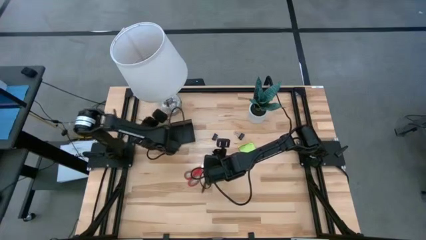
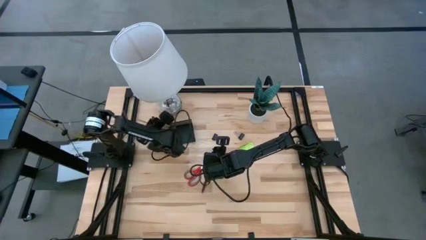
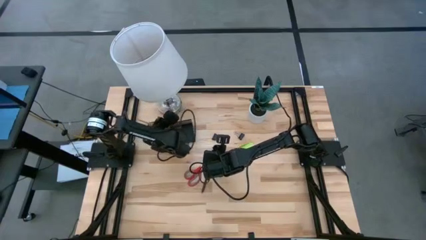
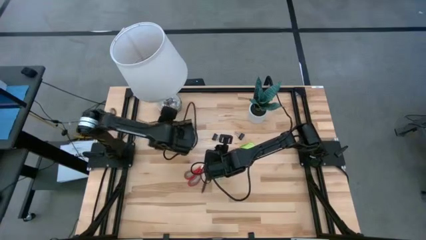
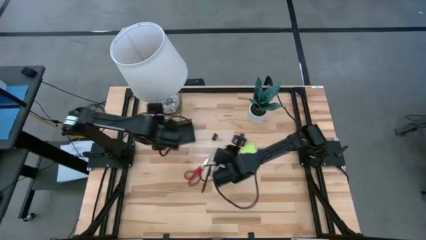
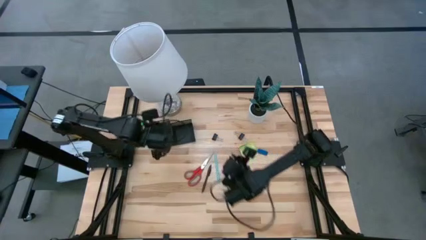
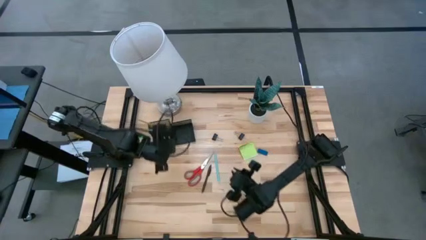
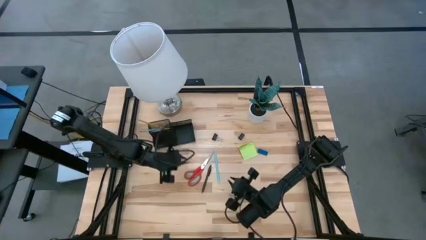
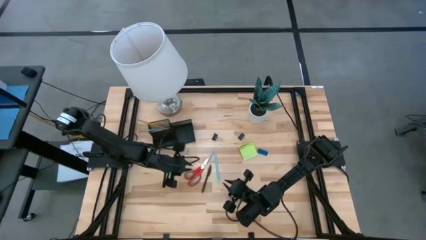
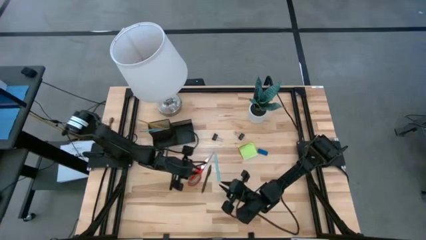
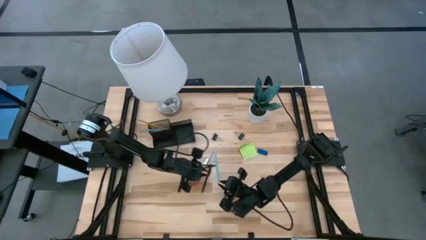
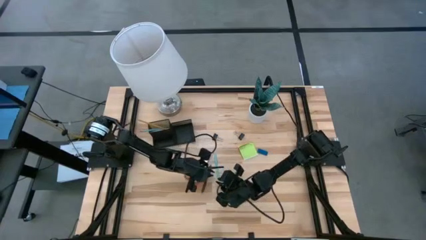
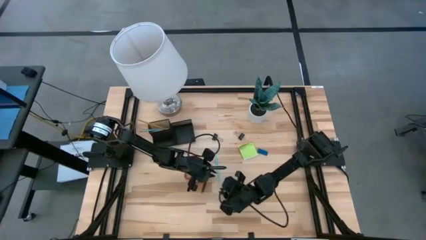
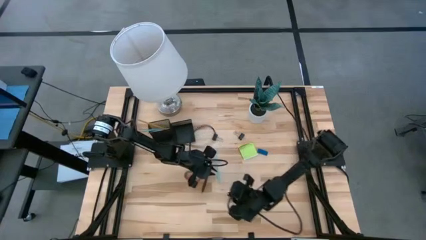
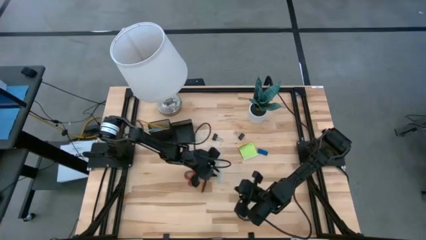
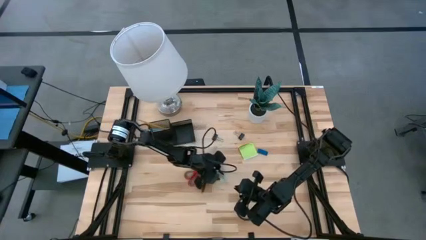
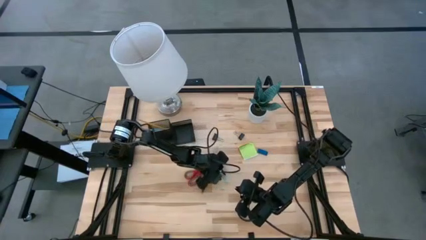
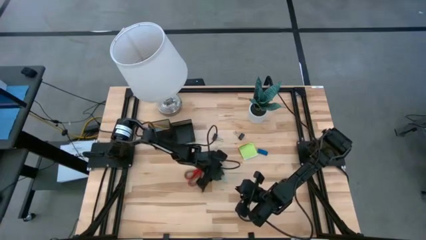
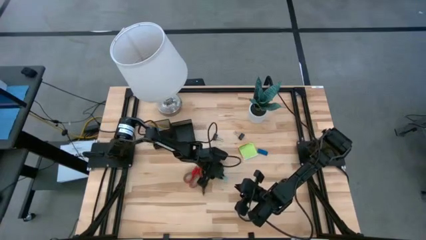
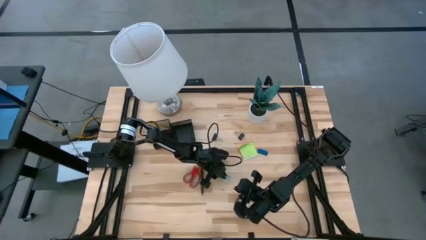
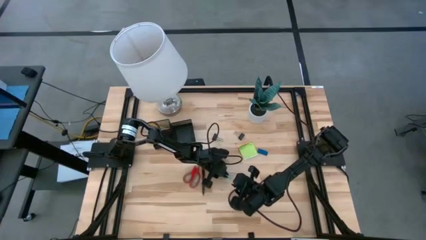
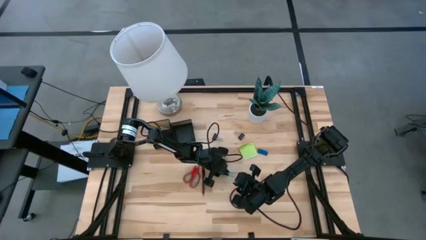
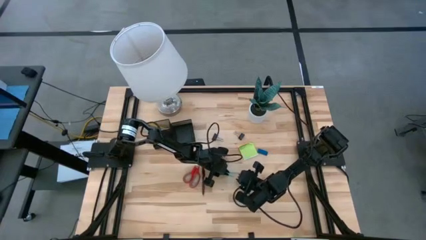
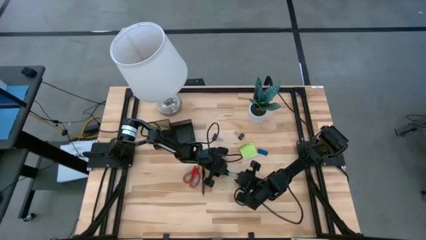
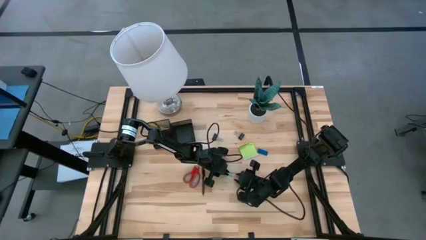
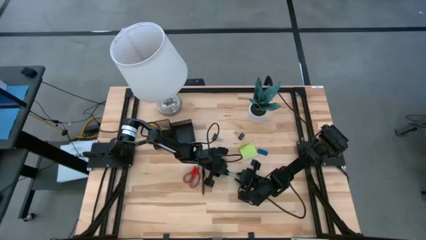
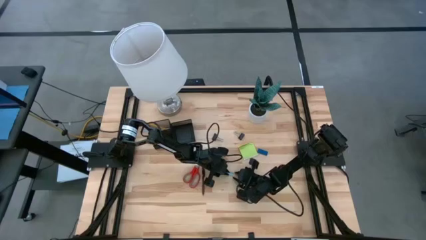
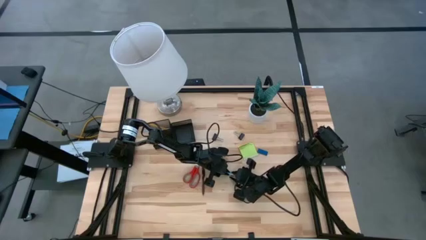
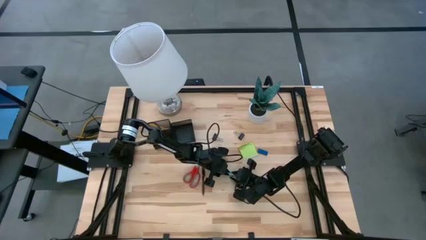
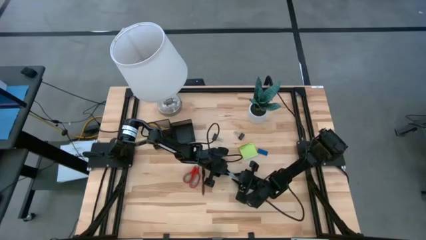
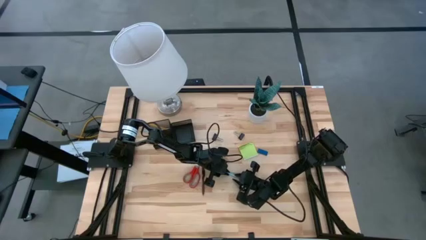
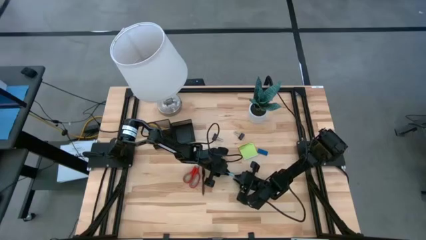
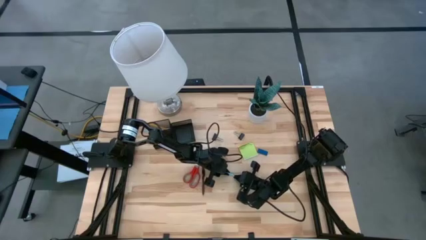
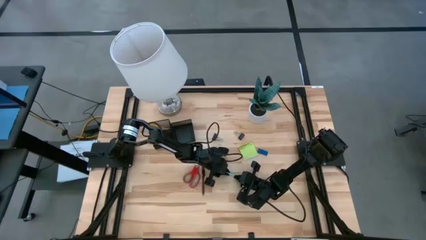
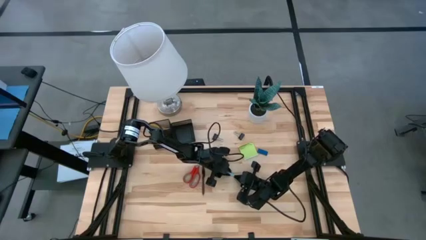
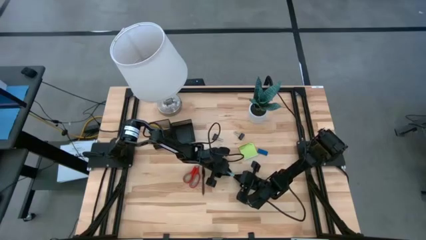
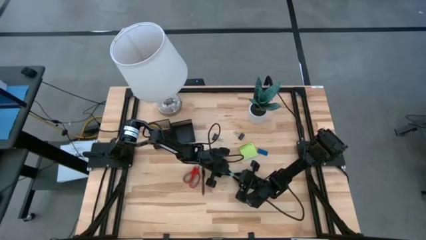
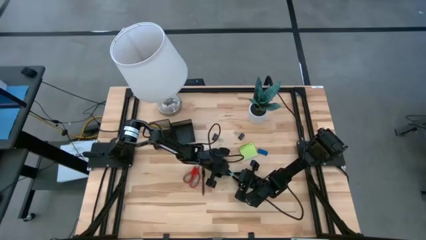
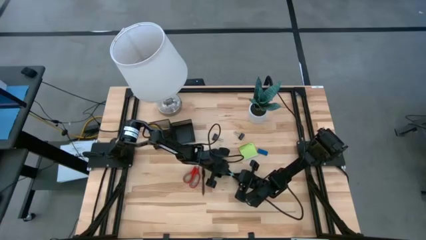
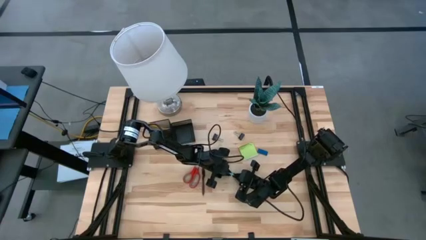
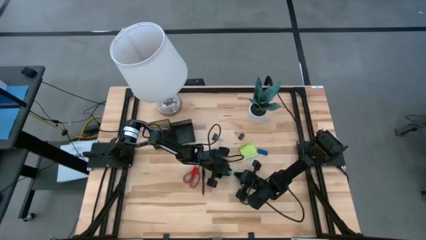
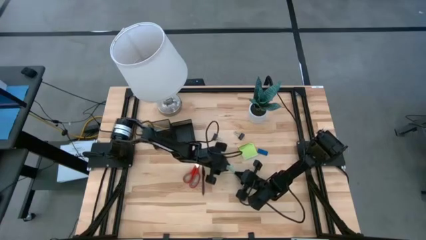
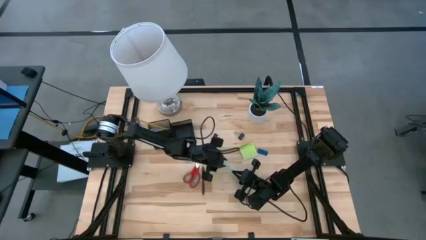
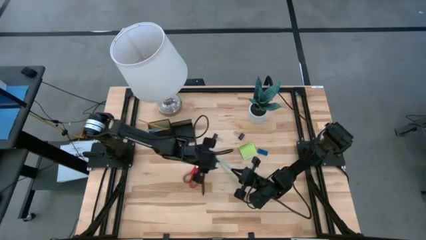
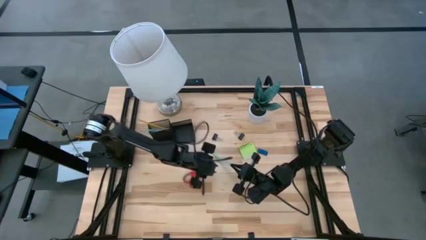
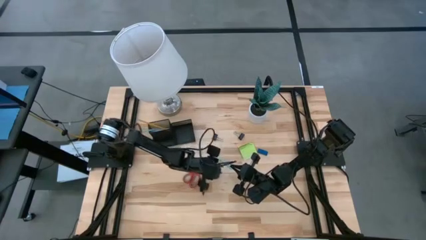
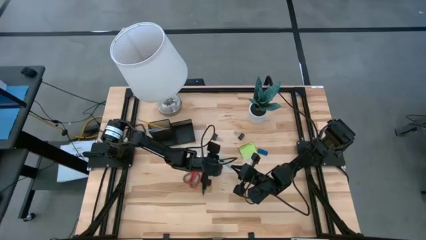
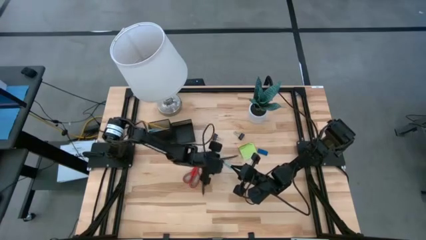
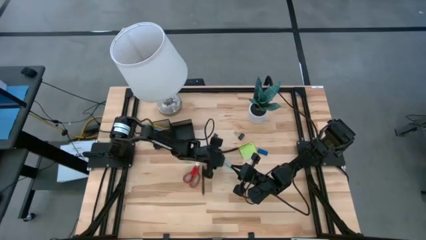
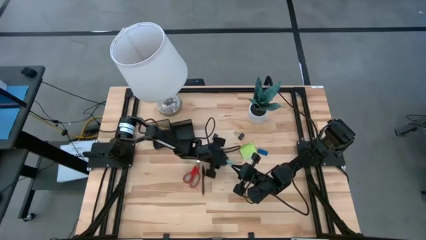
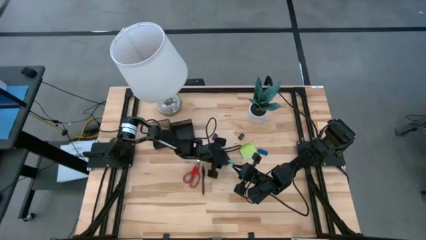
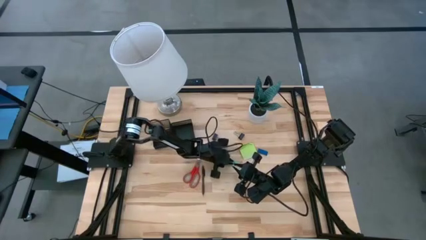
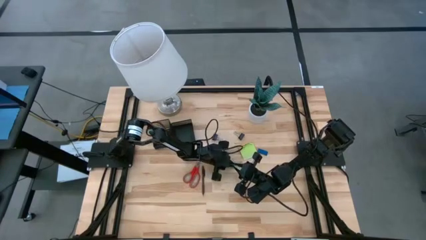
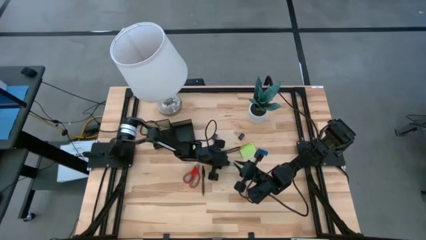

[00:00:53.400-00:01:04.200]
Task: Pick and place office supplies into organizer
Put the blue pen into the black desk organizer

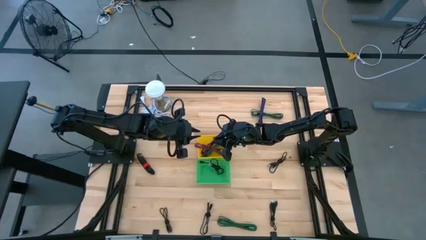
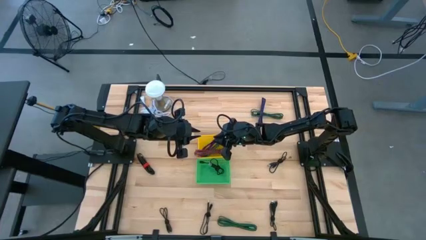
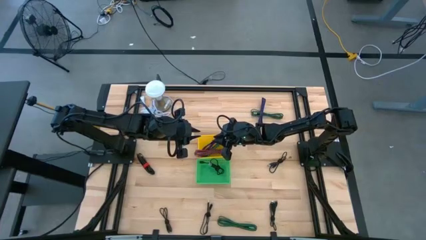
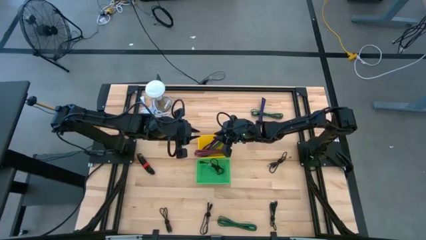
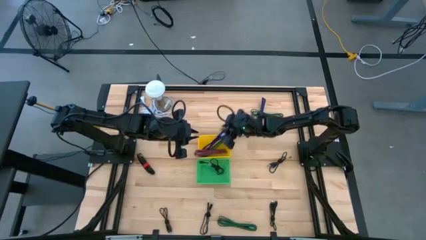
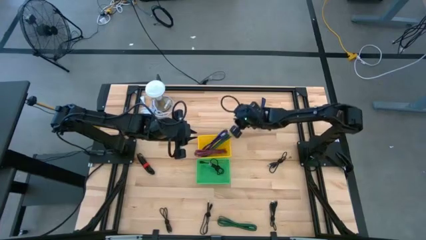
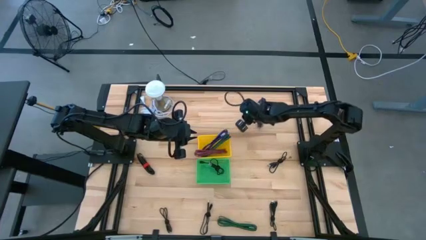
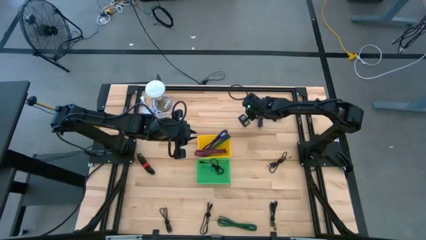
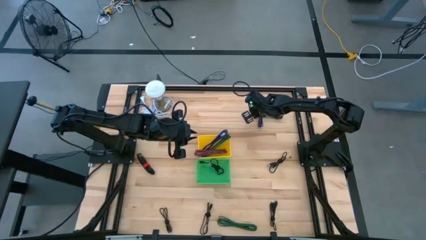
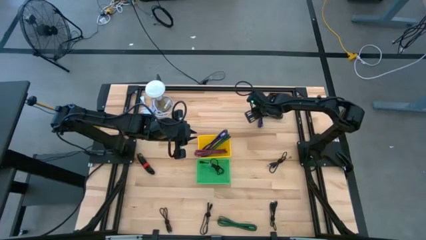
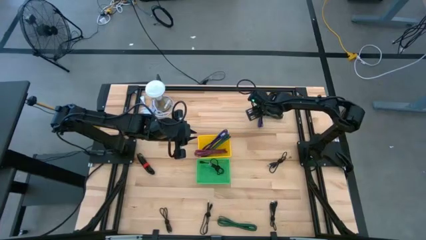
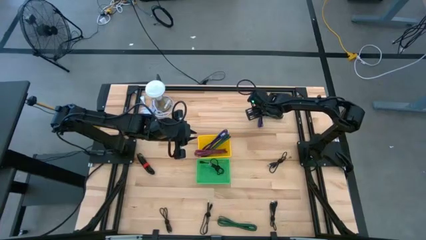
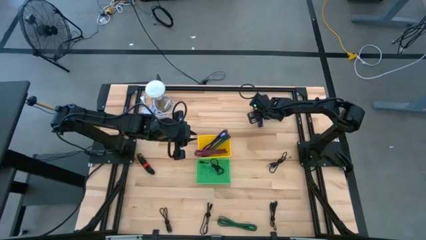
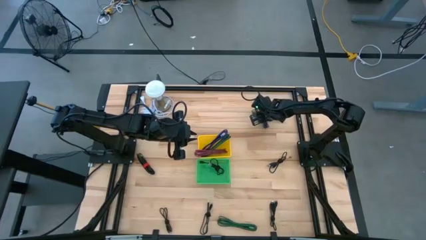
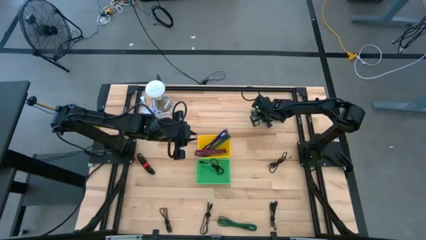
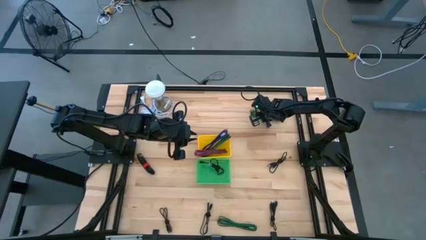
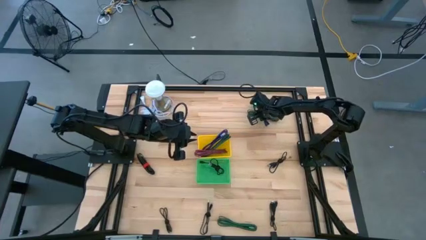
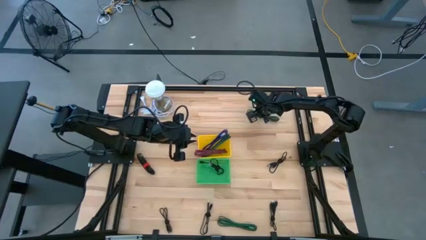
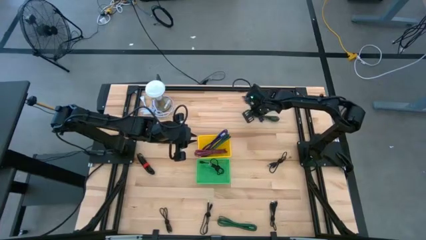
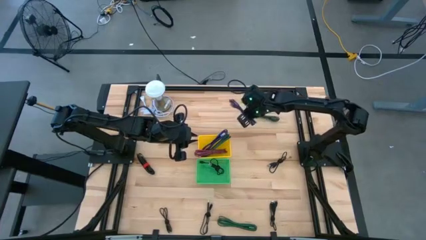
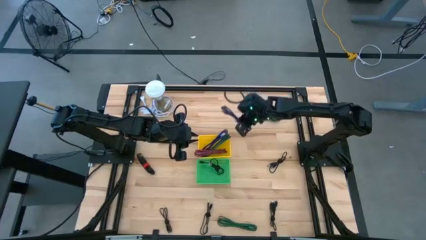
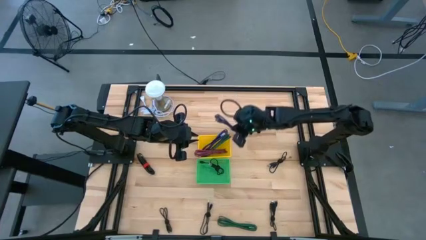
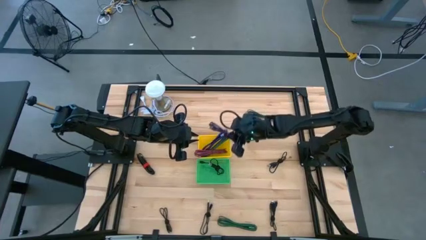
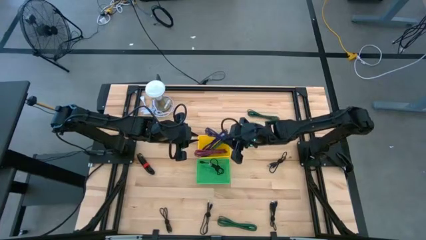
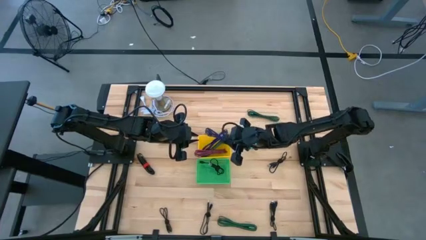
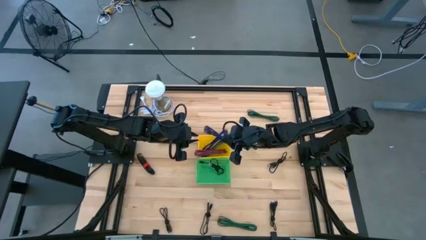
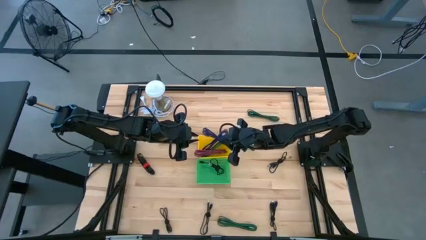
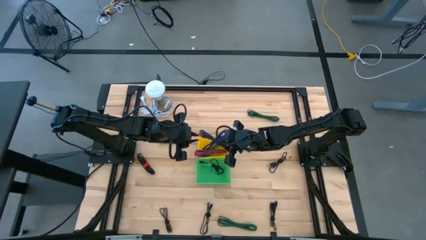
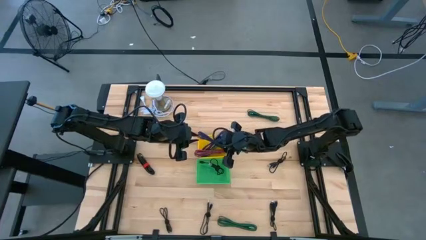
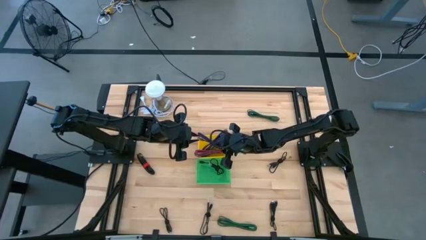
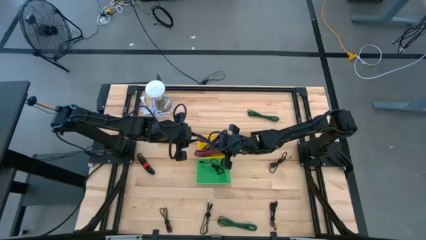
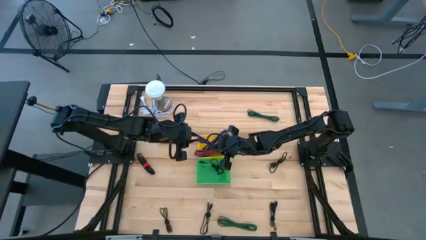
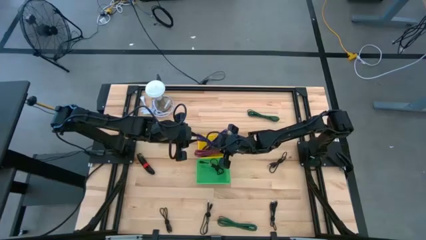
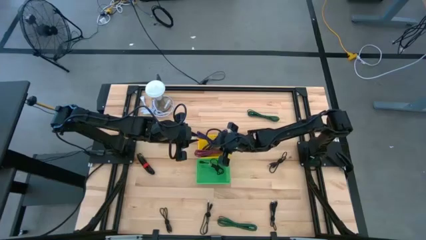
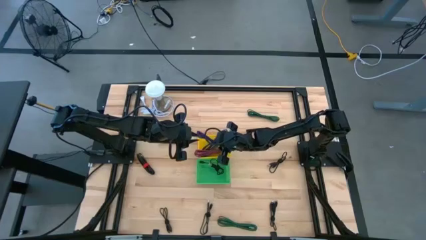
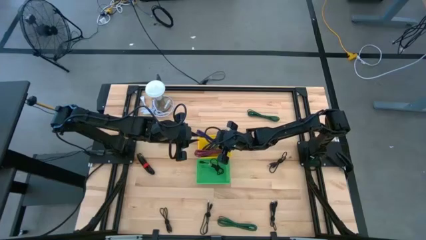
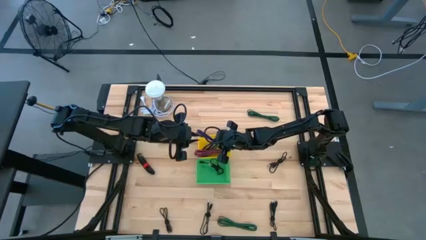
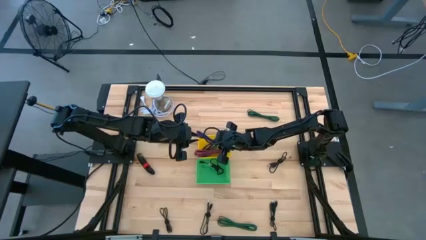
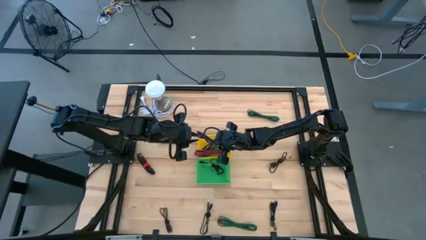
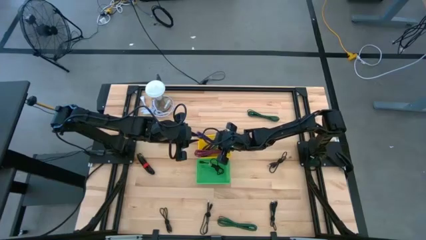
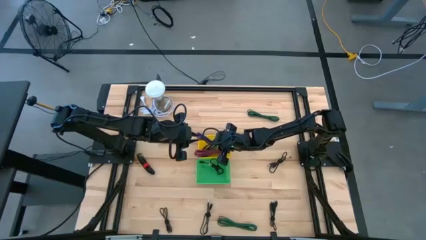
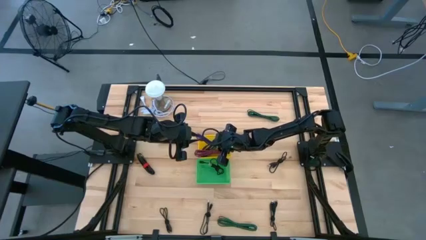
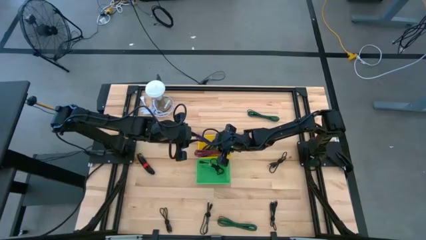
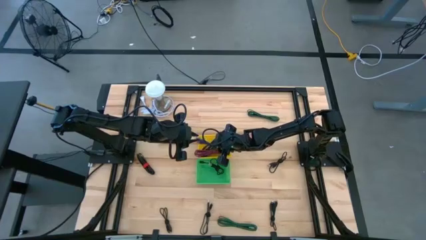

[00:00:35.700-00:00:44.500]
Task: Pick & Place USB Port
Put the violet and black USB cable into the yellow bin
